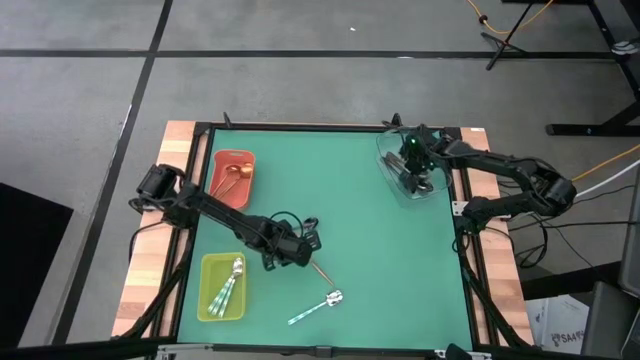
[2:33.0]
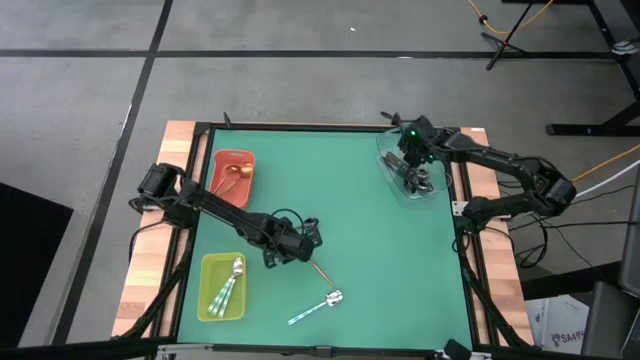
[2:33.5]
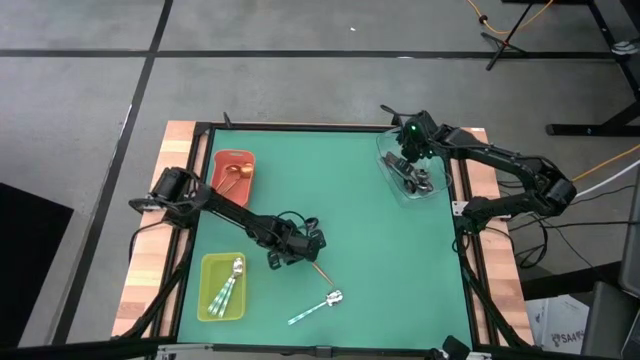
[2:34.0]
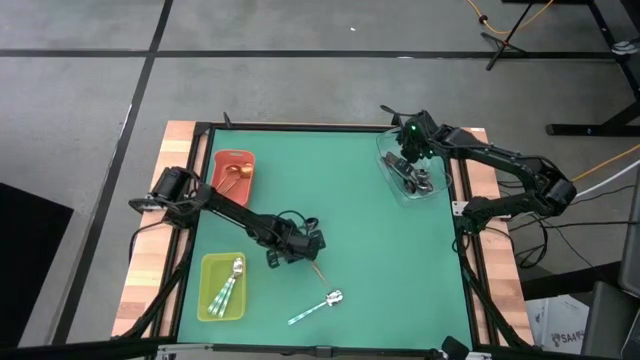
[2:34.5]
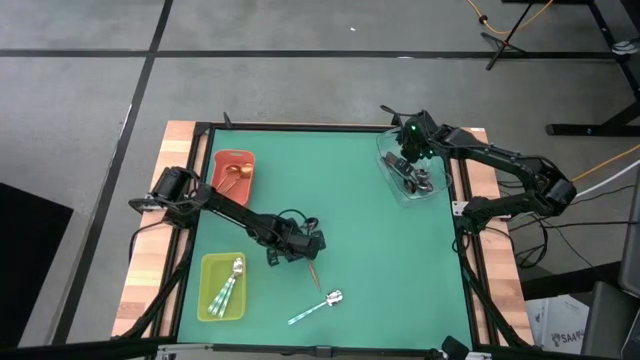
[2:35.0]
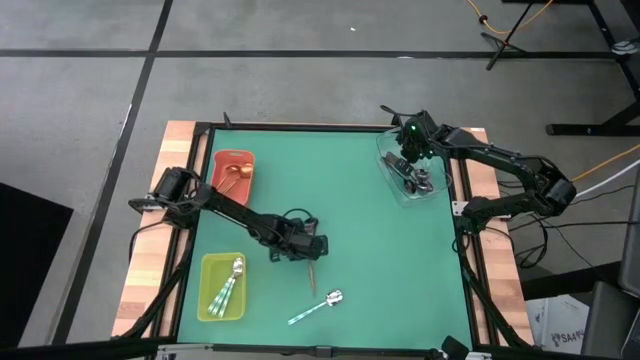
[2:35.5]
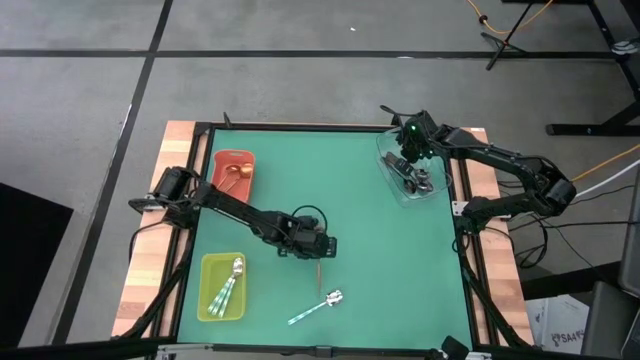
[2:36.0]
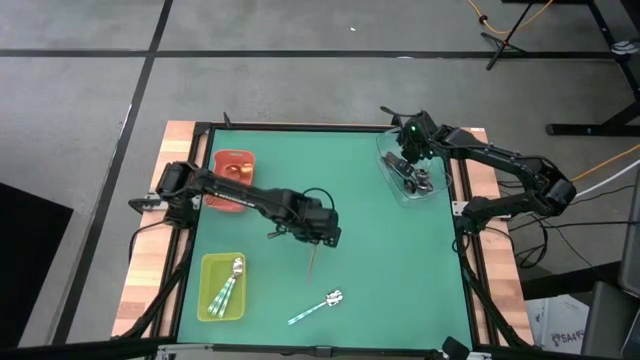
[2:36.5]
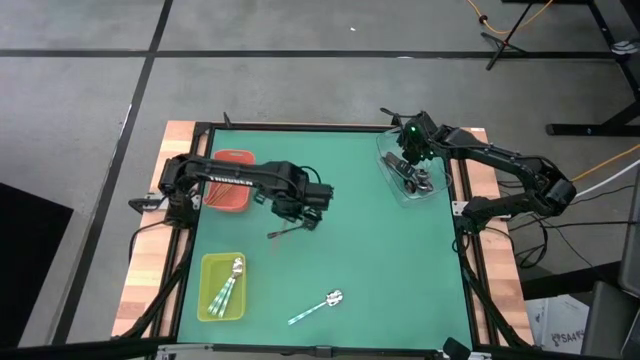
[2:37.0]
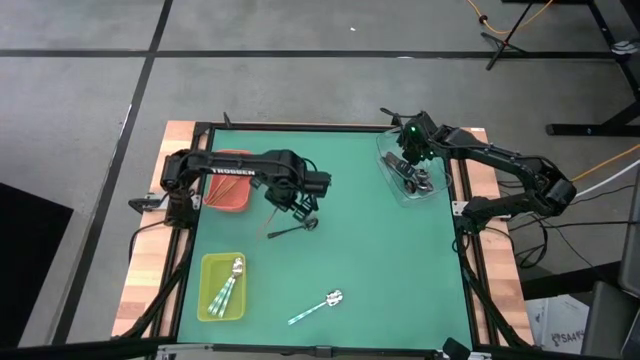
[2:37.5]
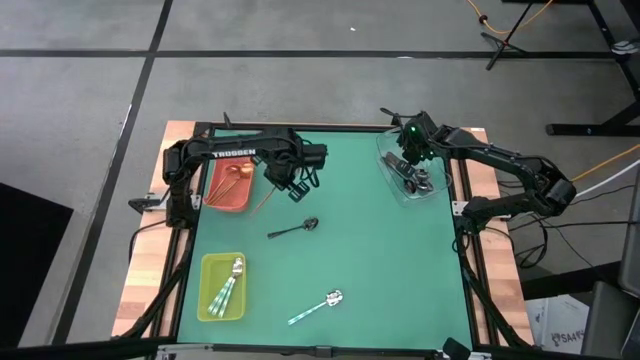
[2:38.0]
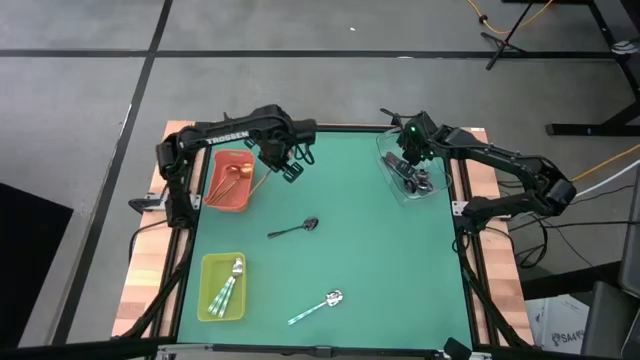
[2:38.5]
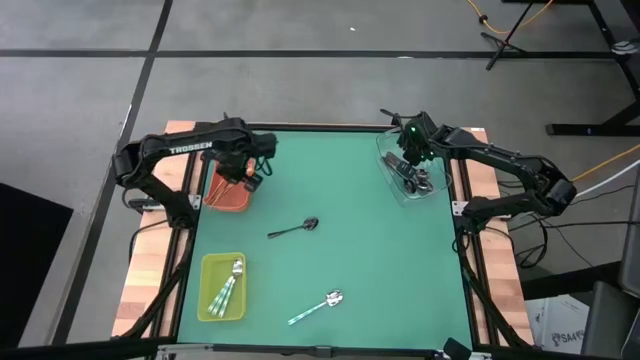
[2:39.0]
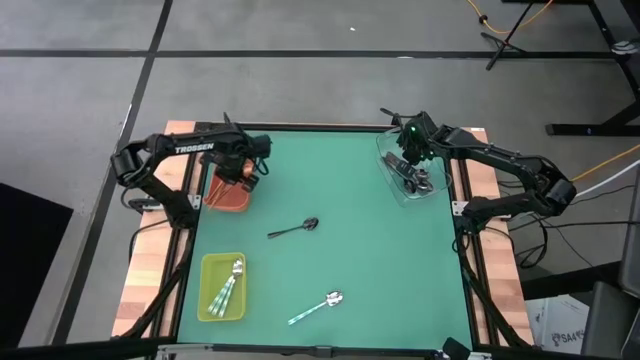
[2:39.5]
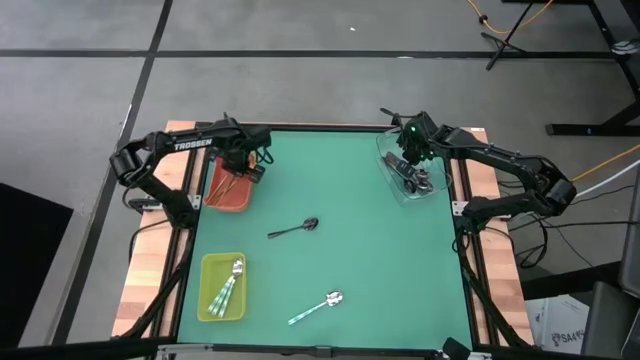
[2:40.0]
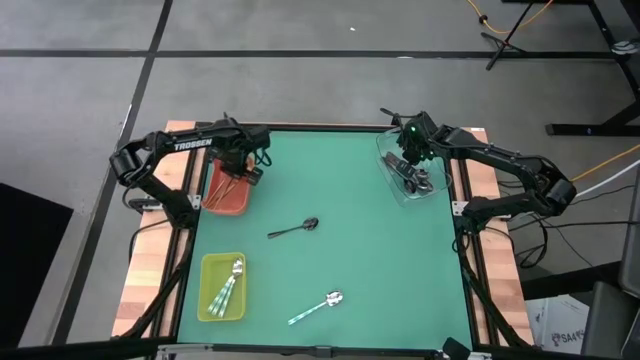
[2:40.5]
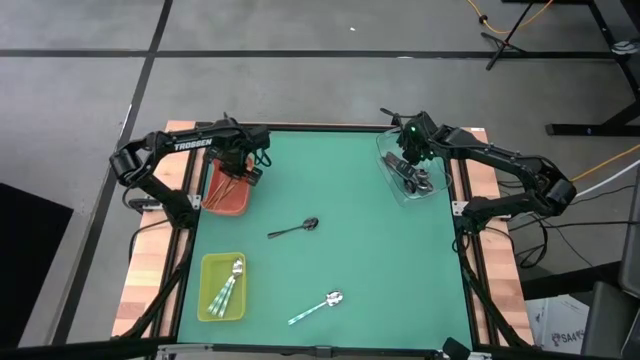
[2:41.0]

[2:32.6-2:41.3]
Task: Sort silverware by color (type)
Put the gold spoon into the orange bin

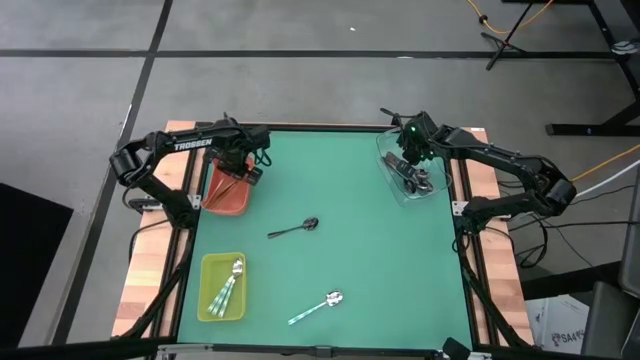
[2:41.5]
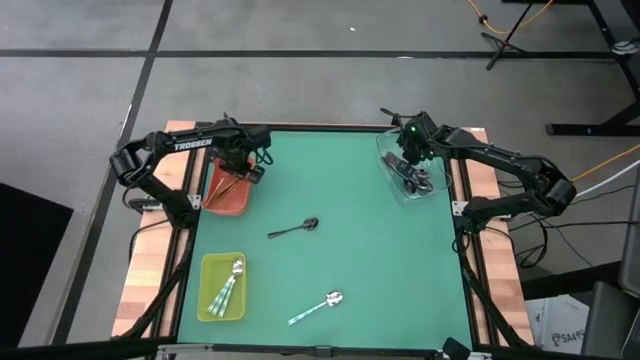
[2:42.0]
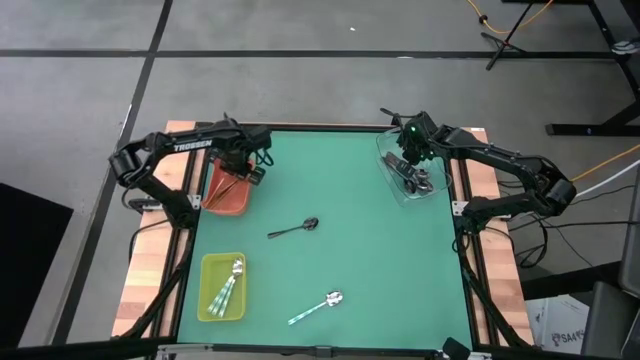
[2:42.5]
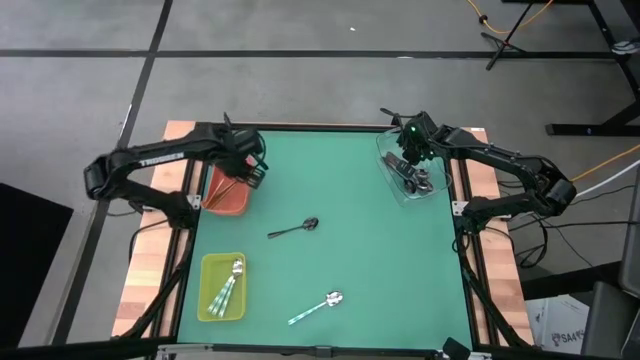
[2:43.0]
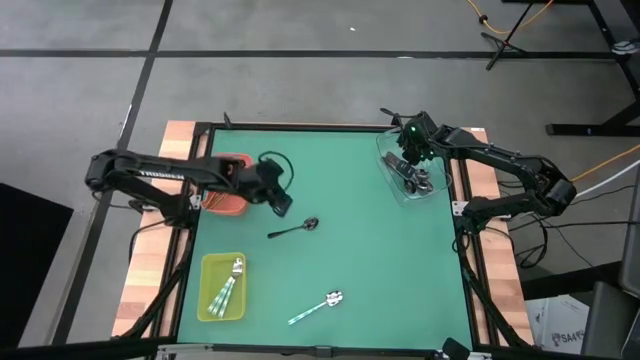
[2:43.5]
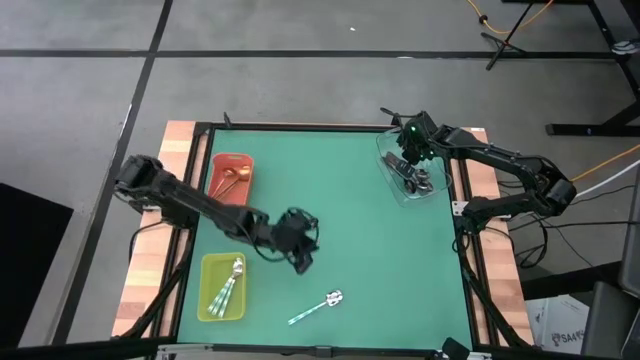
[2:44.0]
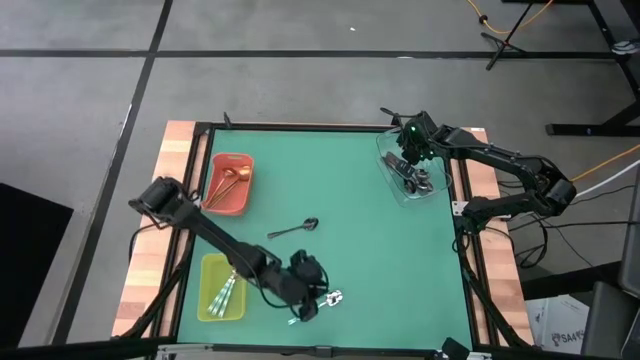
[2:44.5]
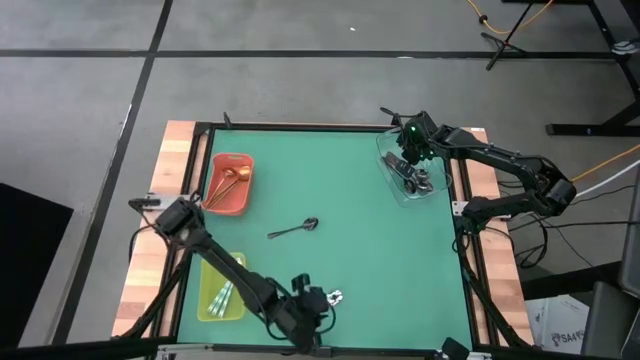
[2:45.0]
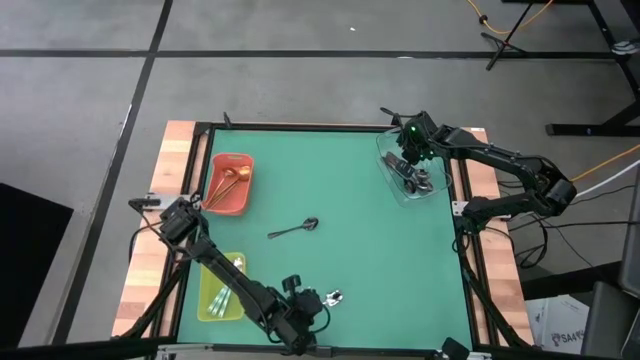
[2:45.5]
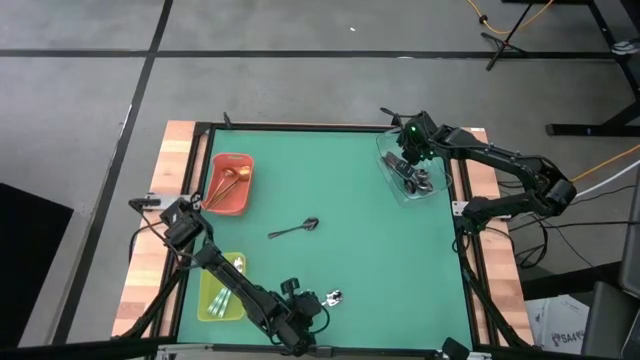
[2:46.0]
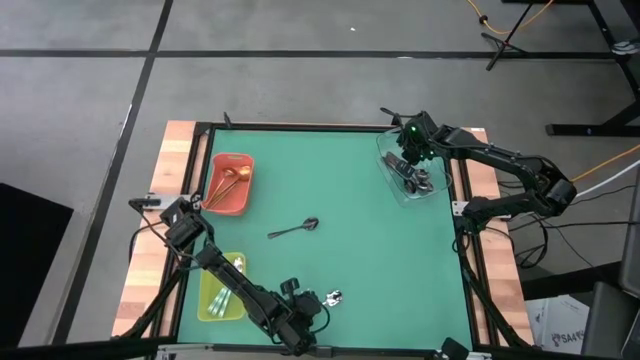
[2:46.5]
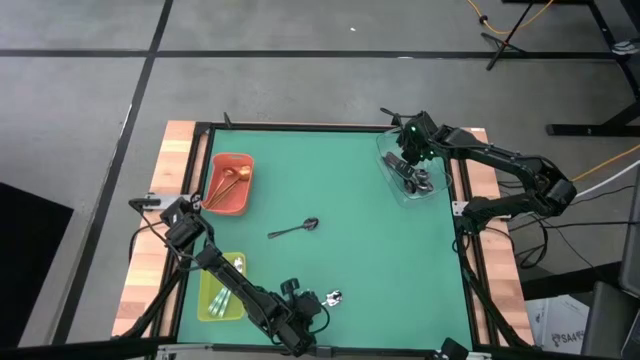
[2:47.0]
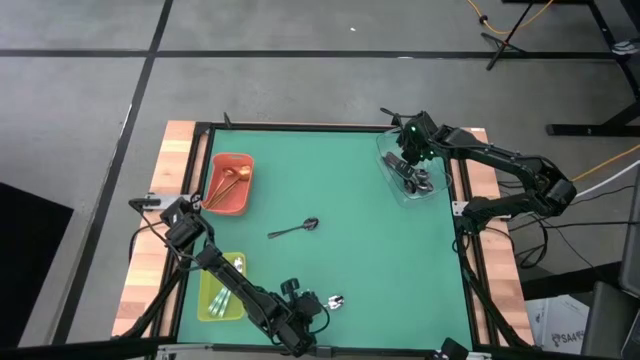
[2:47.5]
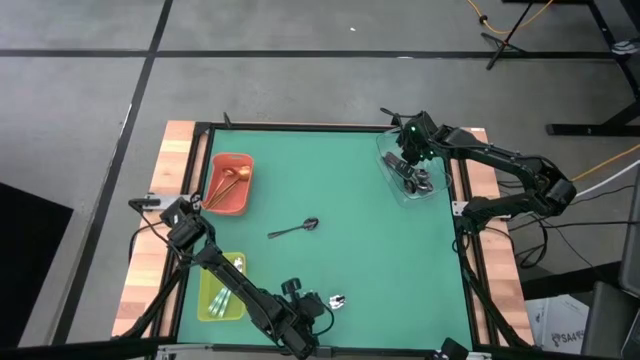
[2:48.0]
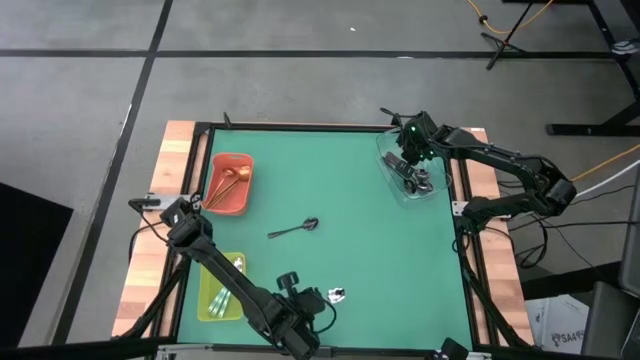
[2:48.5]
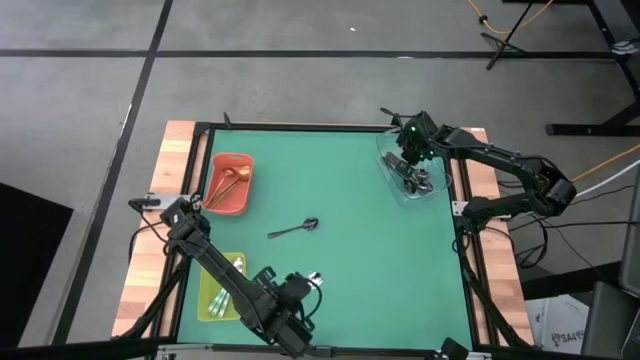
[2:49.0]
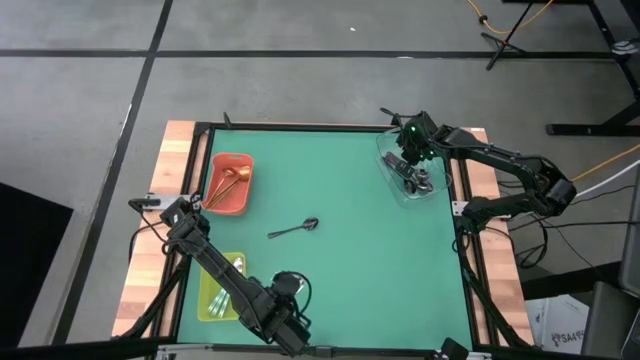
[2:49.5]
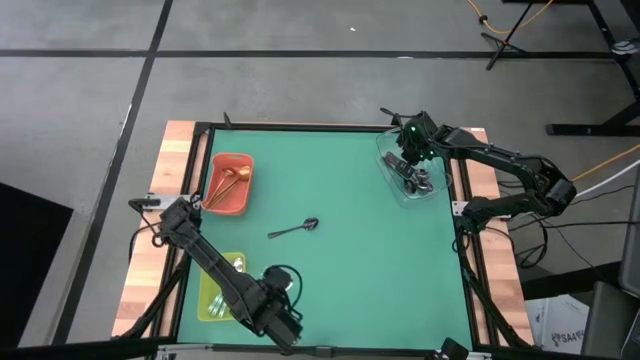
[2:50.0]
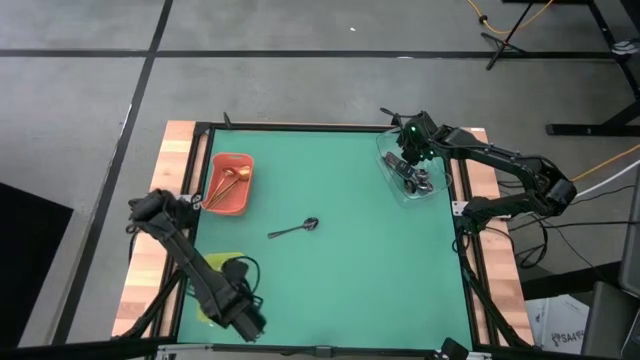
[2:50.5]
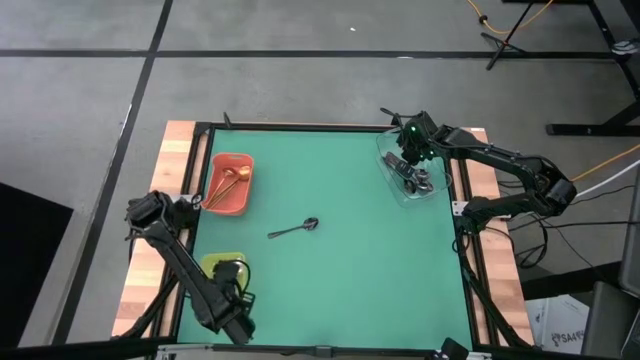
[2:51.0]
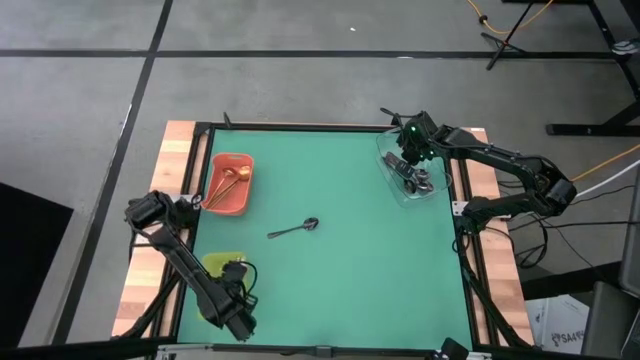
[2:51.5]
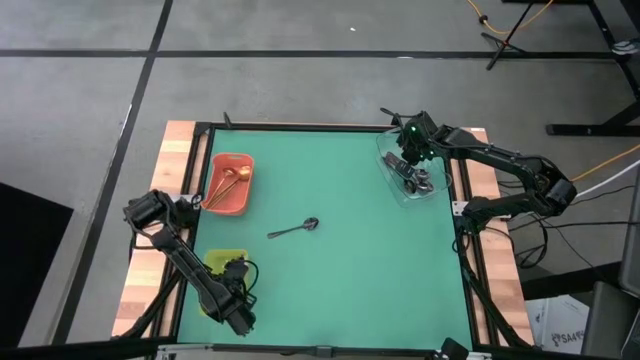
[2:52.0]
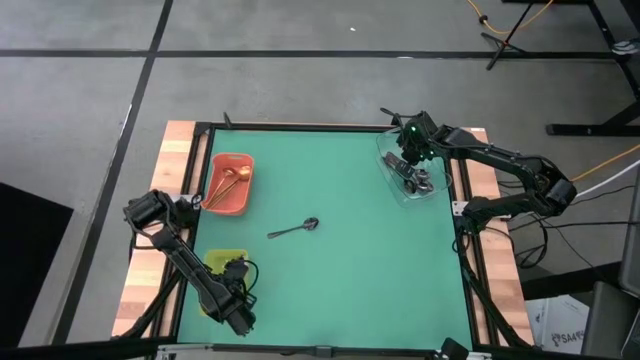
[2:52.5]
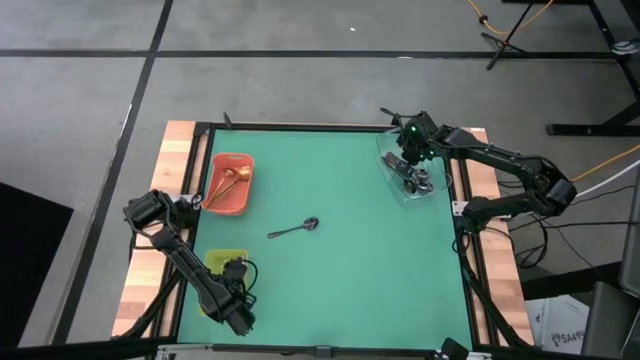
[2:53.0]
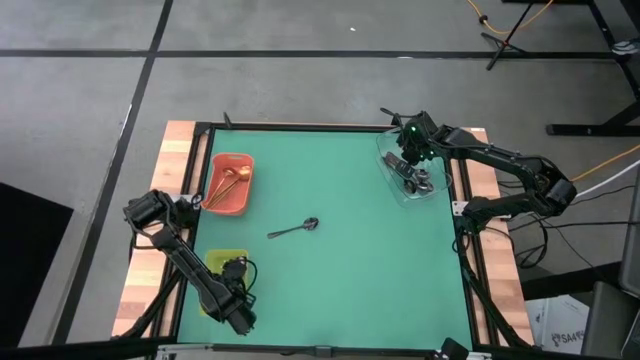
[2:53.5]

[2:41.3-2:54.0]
Put the blue patterned spoon into the yellow bin

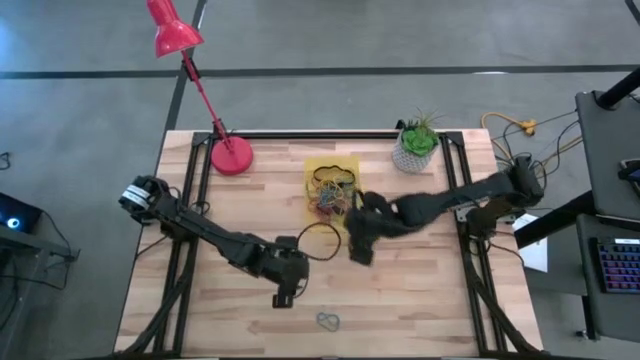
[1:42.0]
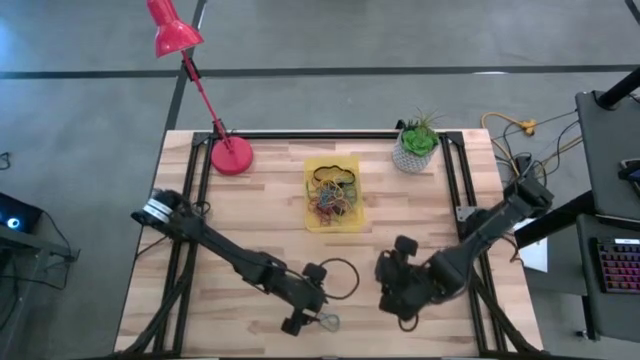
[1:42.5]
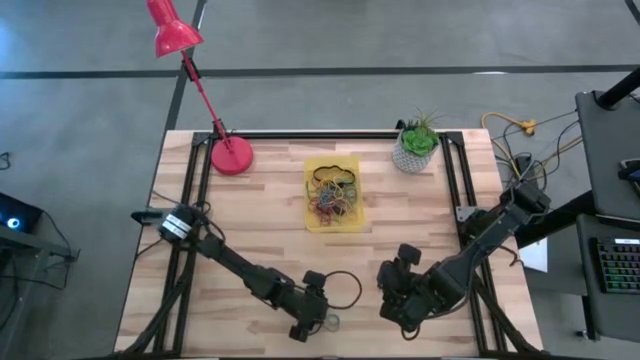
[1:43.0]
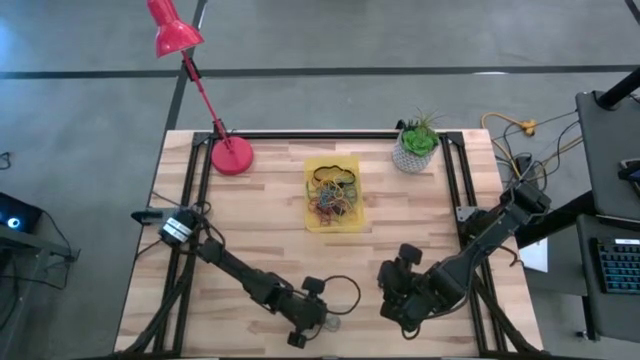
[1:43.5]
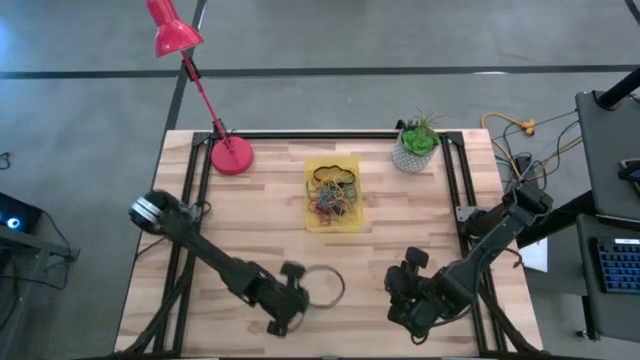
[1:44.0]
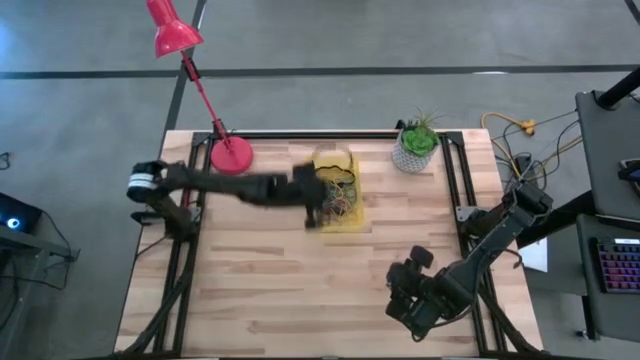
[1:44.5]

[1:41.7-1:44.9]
Task: Pick and place rubber bands into bin
Put the blue rubber band into the yellow bin
